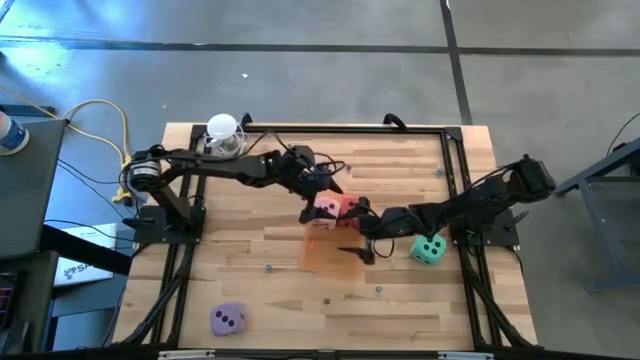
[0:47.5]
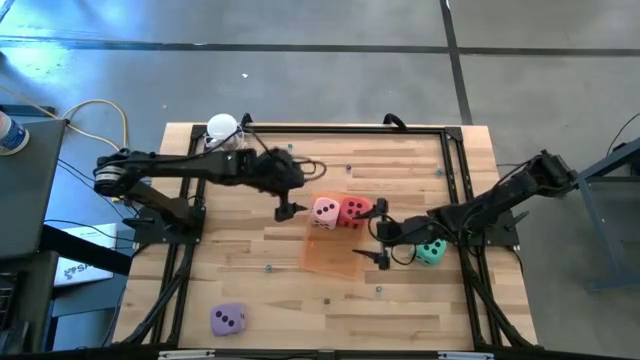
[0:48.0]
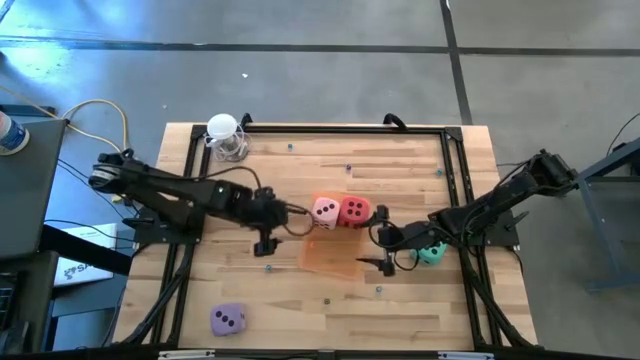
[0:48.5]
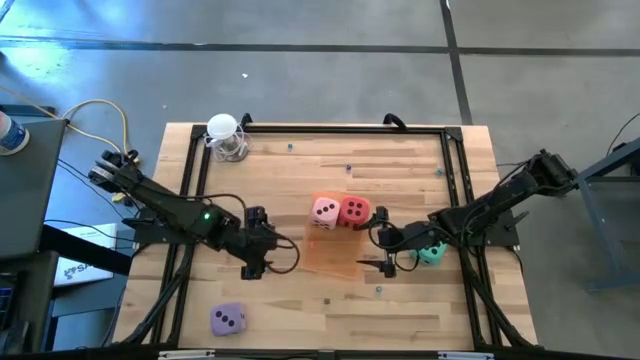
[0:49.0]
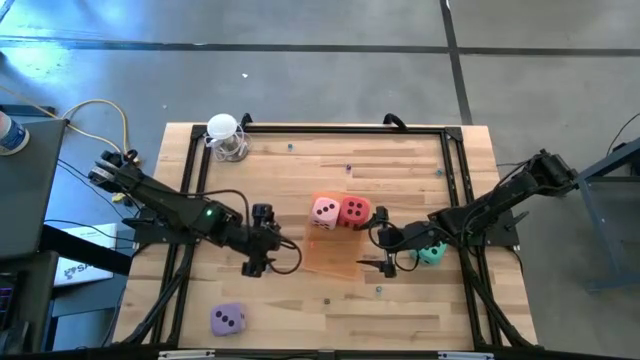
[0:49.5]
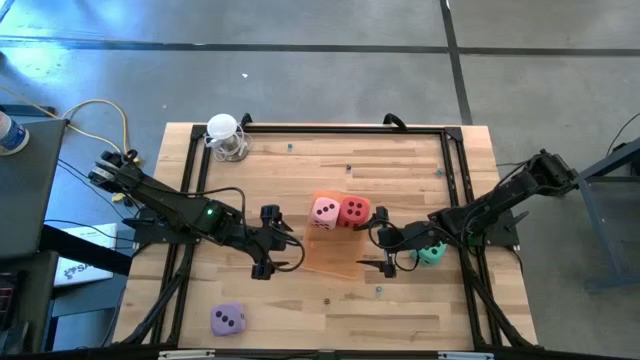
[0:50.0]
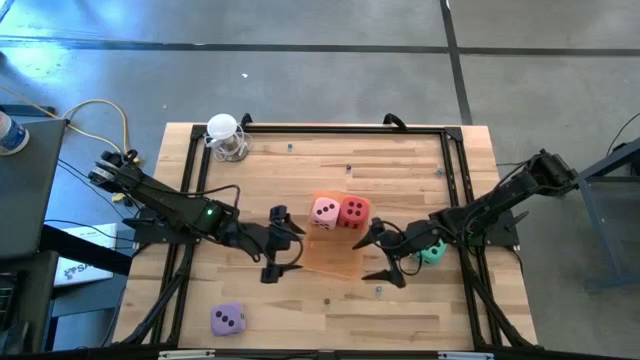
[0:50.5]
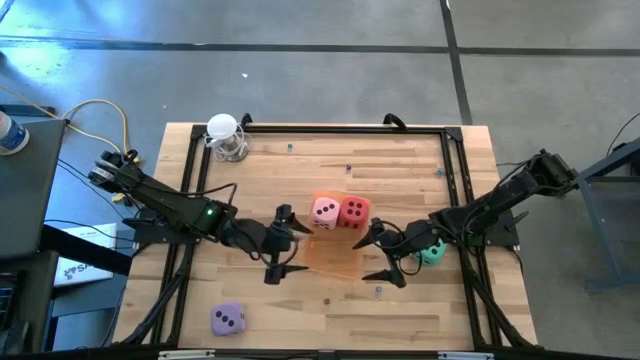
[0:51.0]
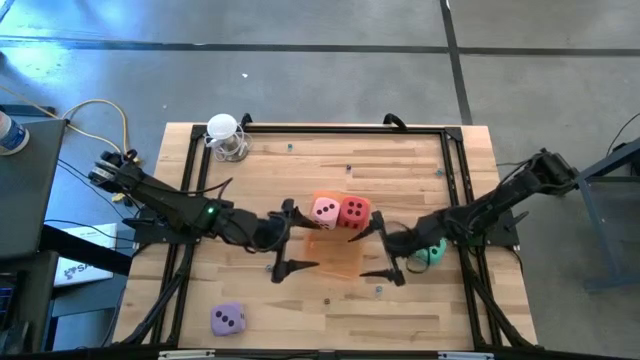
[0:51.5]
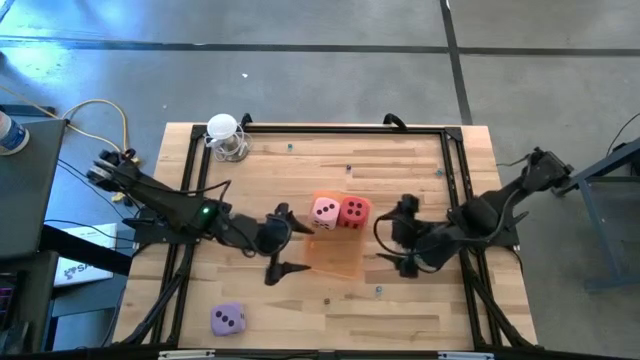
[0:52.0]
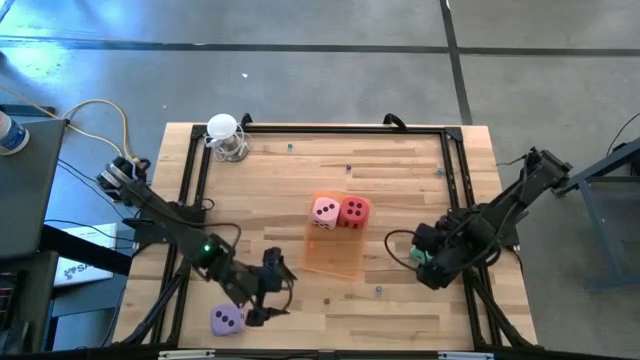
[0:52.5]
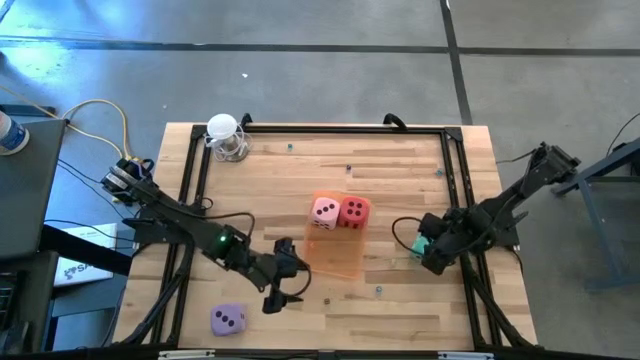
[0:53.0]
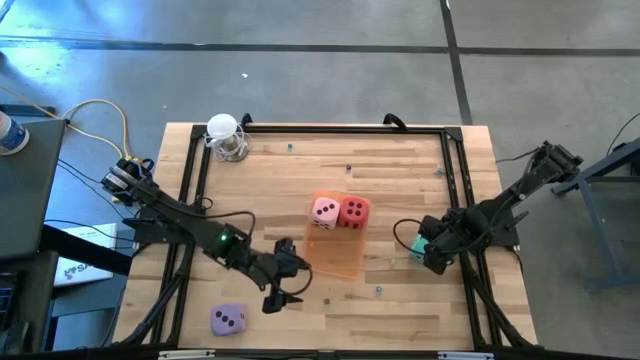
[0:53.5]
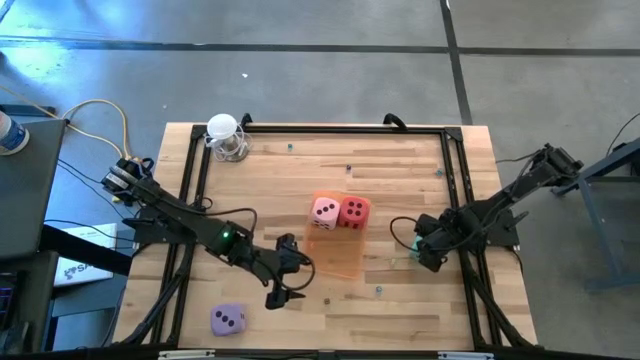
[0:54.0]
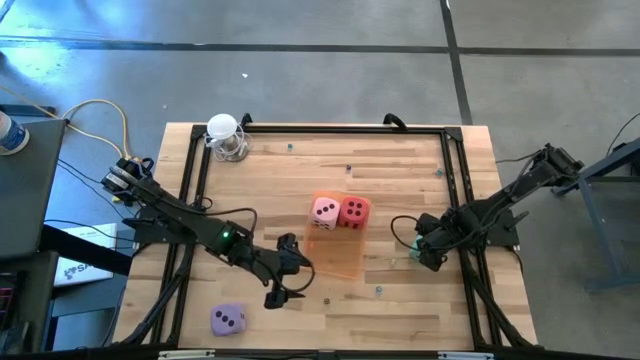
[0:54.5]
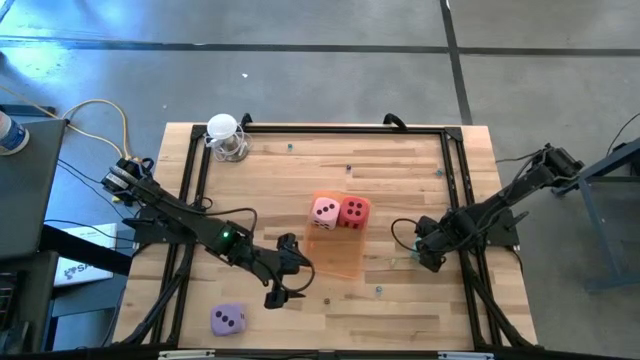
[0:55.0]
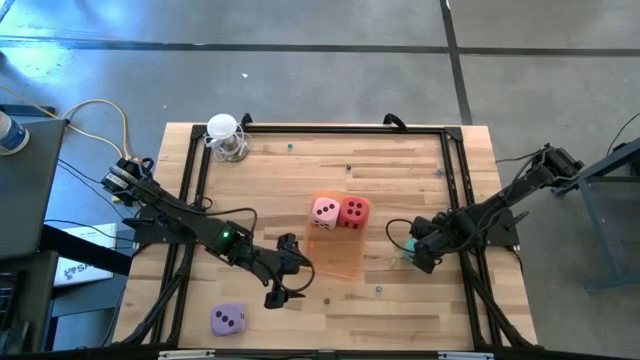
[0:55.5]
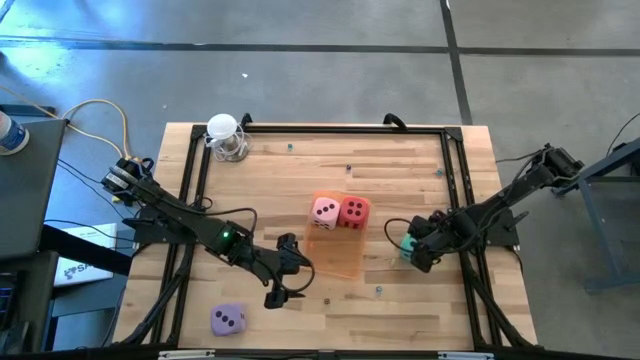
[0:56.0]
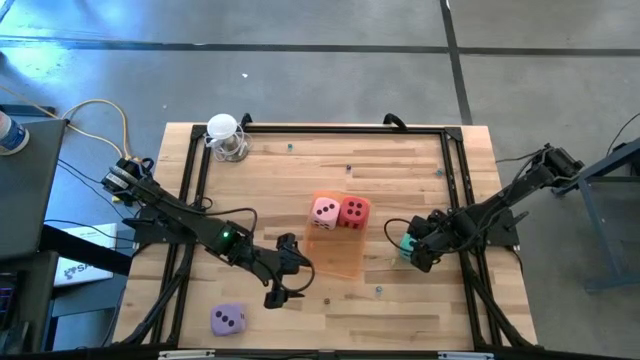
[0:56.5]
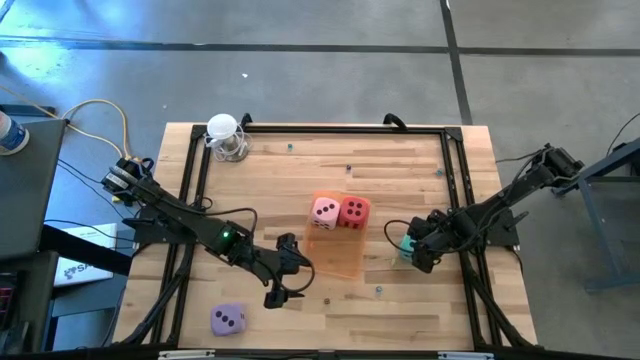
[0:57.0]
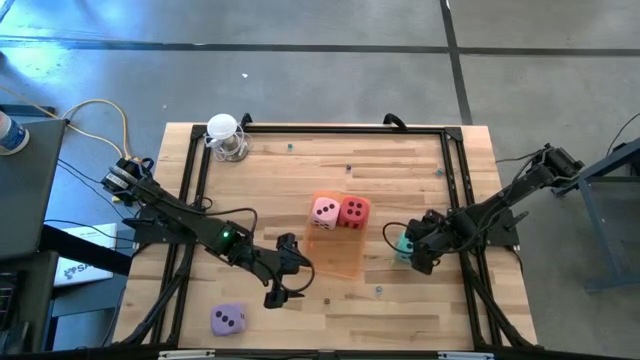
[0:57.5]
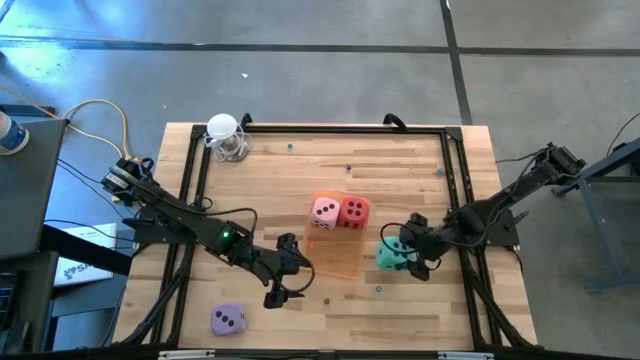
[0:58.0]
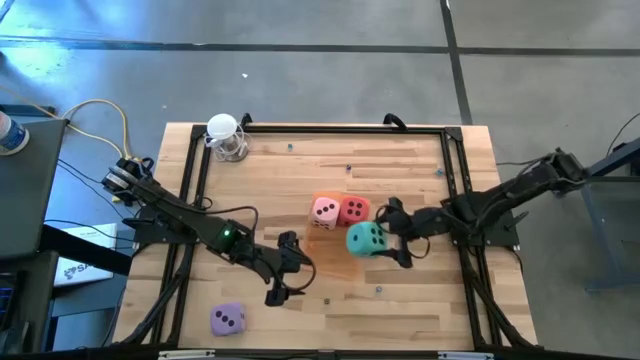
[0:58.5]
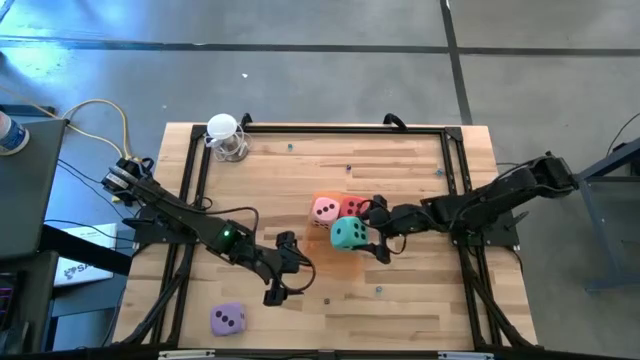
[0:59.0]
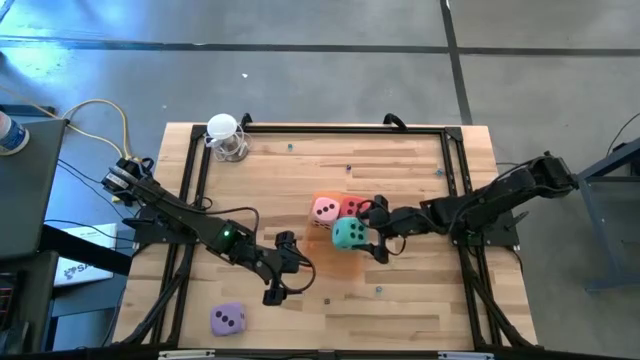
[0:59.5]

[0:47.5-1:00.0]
Task: Pick & Place Dice
Put the large blue die into the orange bin

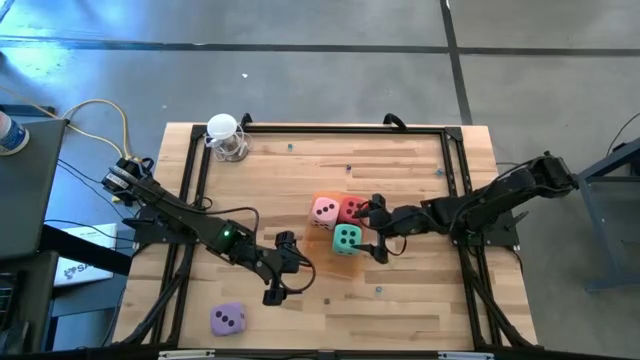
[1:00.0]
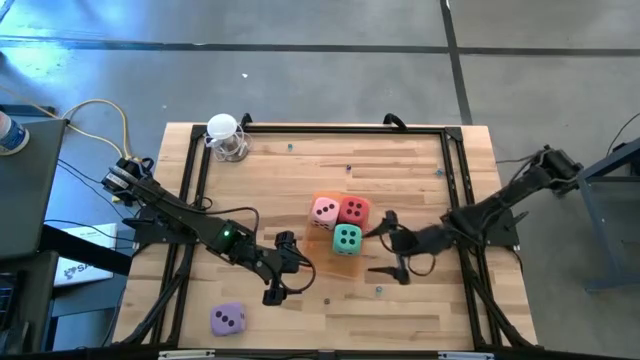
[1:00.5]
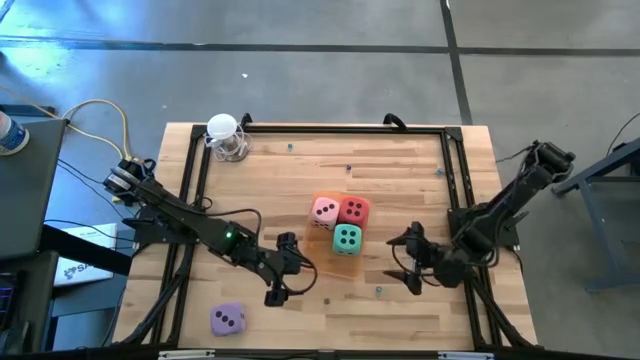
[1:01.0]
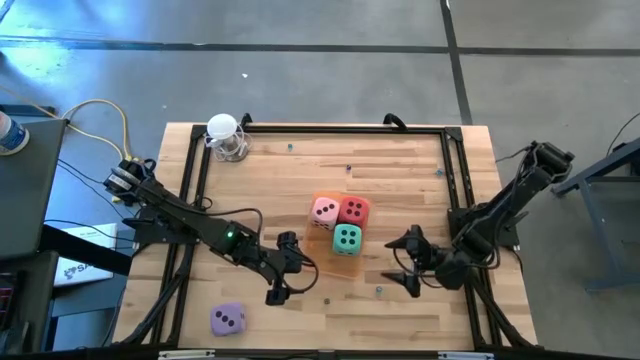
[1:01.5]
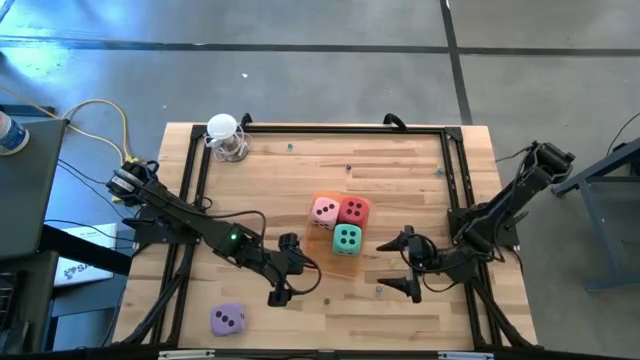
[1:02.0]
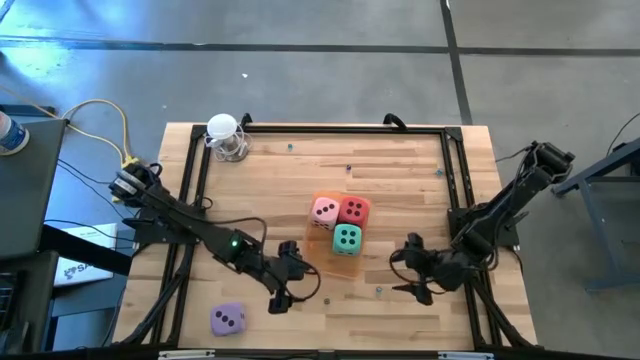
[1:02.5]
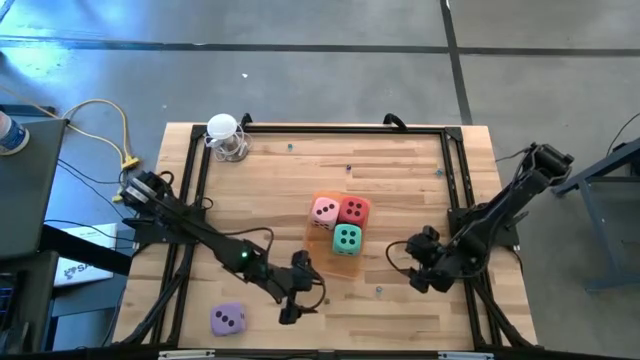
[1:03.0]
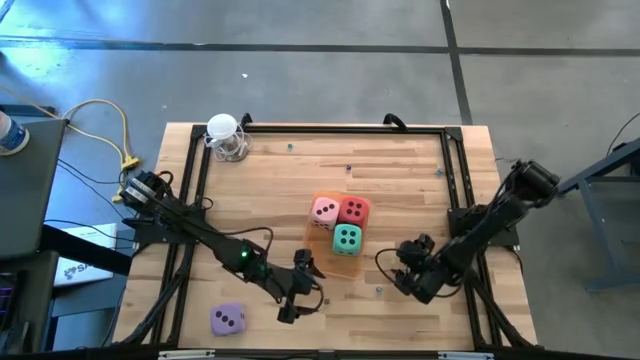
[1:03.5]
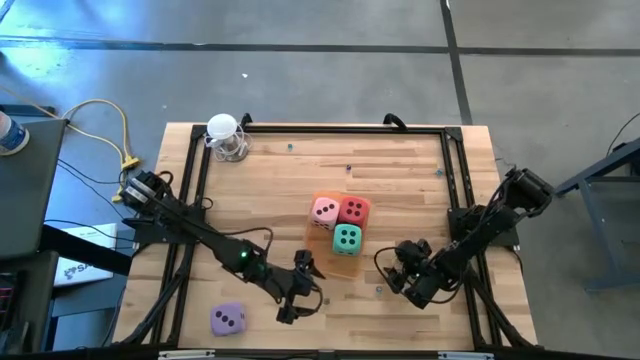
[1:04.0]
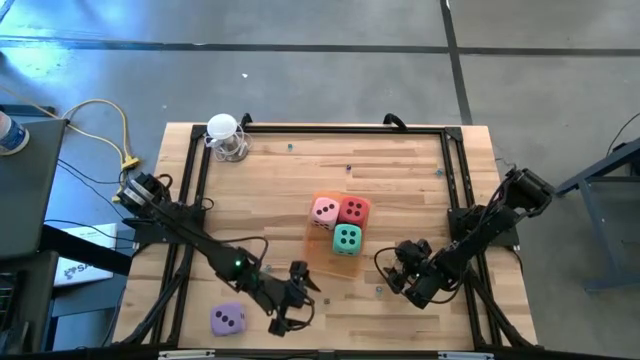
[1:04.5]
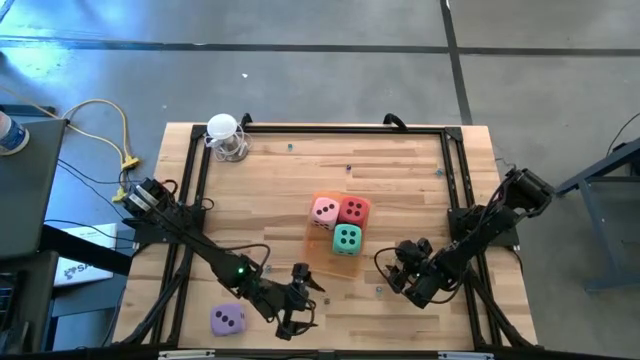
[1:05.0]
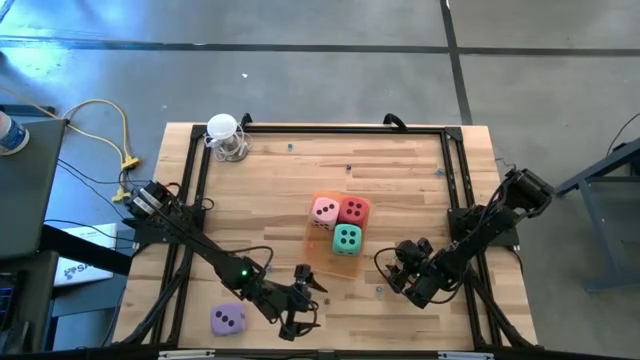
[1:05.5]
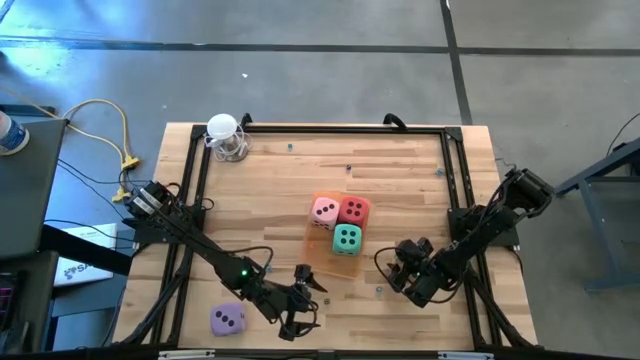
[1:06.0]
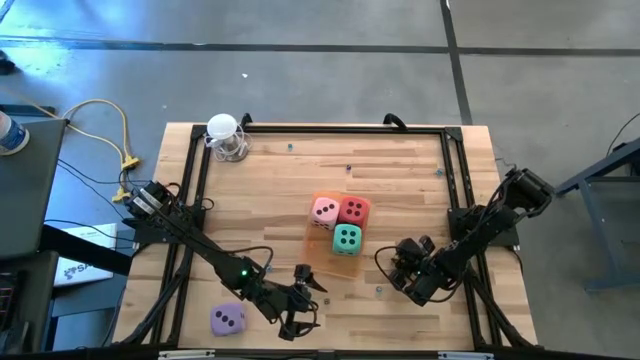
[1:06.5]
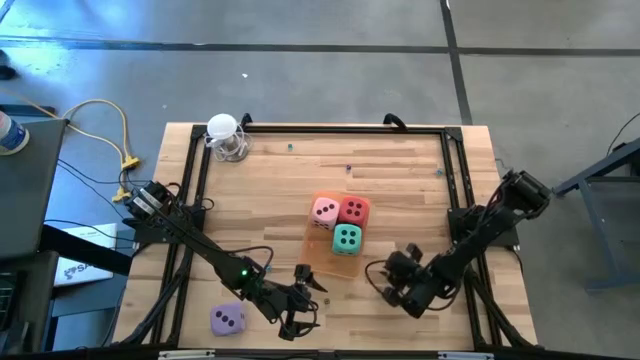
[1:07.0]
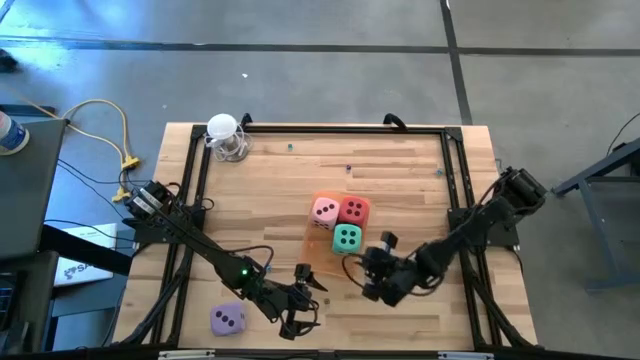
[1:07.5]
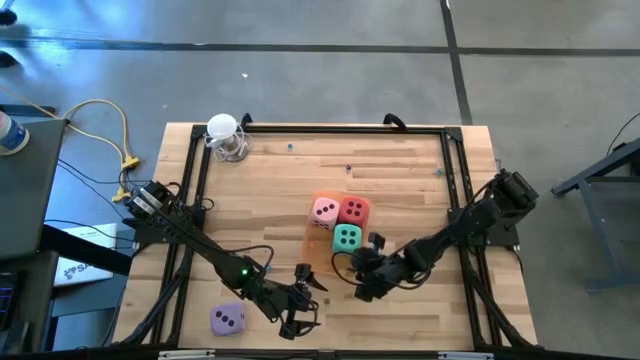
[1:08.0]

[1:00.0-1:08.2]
Put the small green die into the orange bin

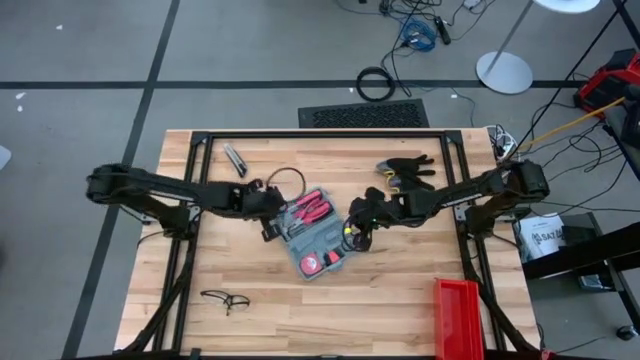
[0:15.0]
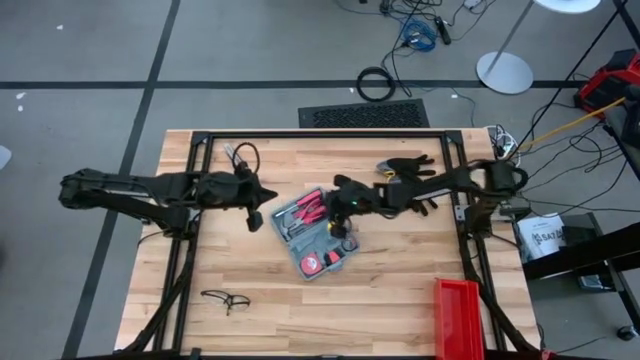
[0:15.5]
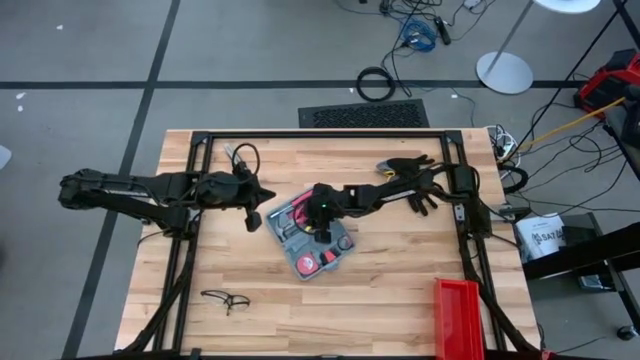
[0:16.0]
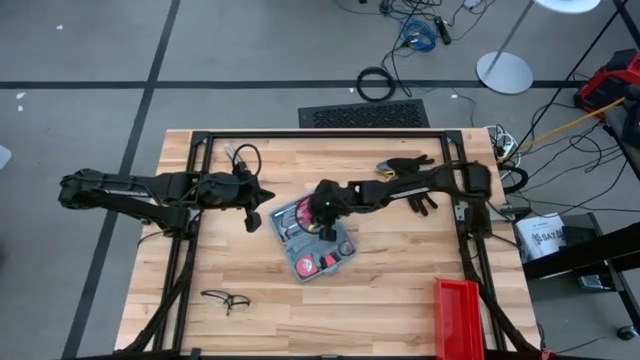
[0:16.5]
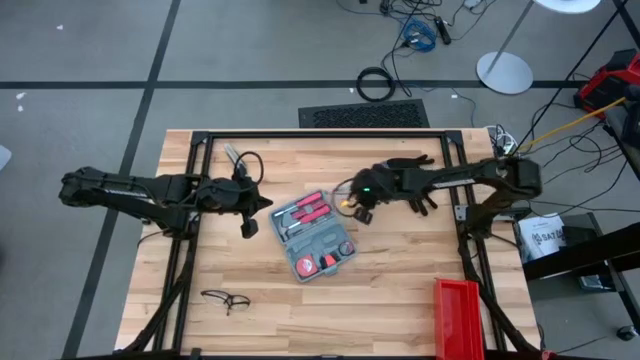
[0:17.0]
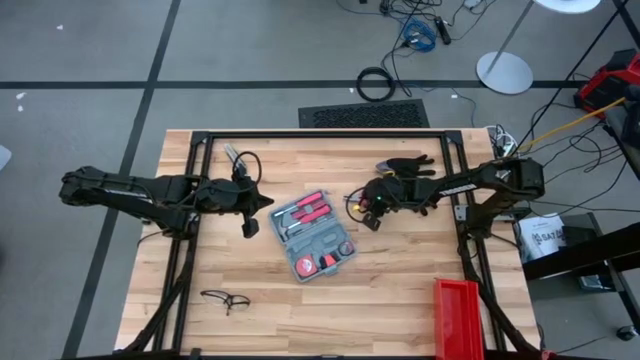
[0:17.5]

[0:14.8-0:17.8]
Task: prefit tool cases
Remove pink plier from the gray prefit tool case
